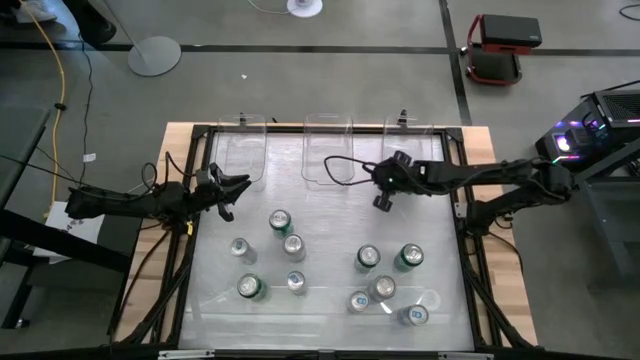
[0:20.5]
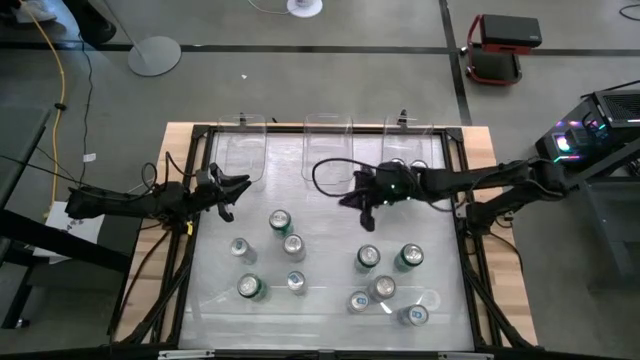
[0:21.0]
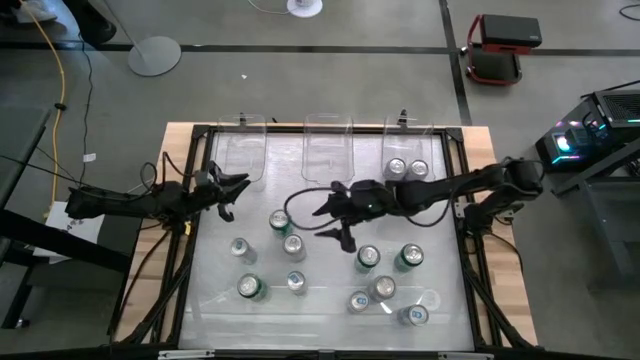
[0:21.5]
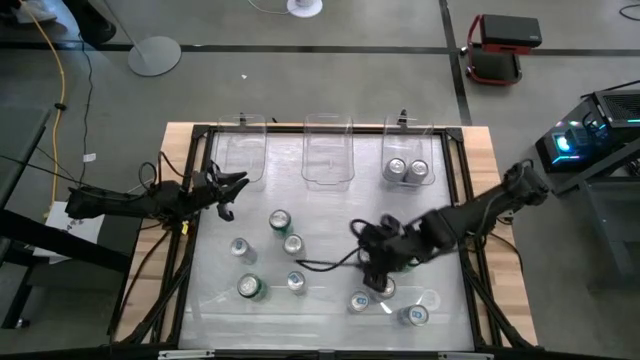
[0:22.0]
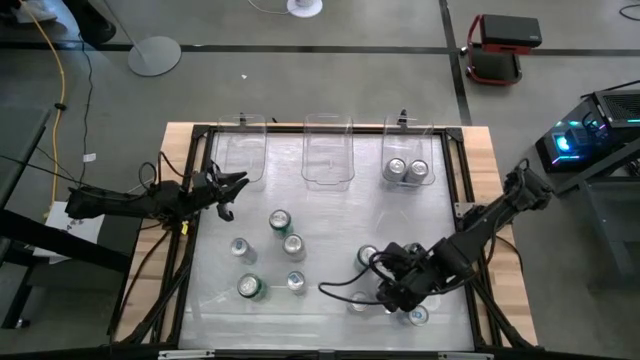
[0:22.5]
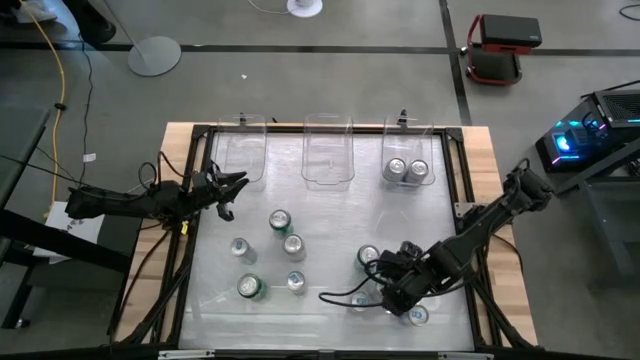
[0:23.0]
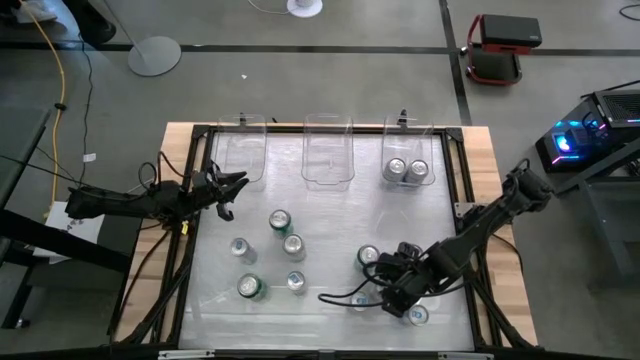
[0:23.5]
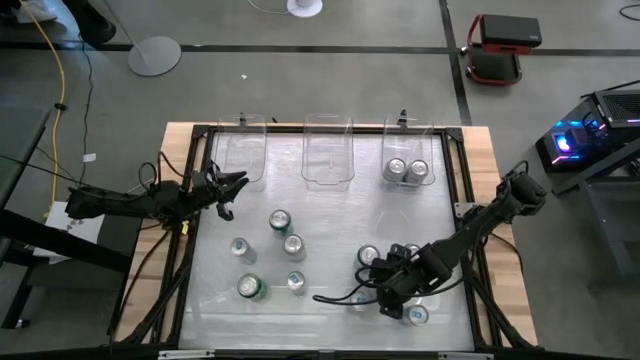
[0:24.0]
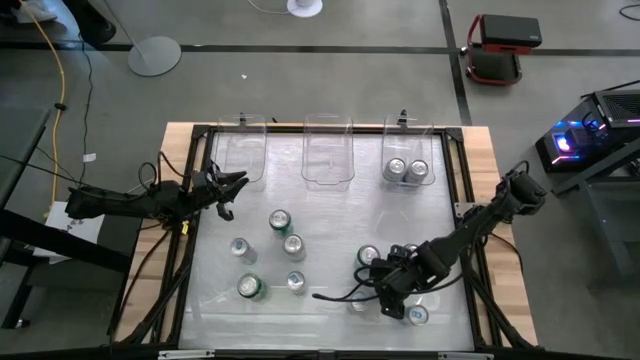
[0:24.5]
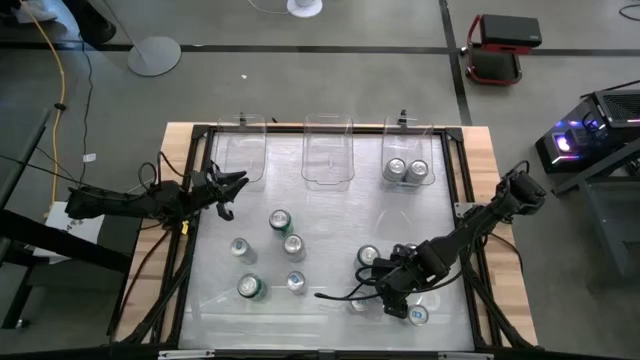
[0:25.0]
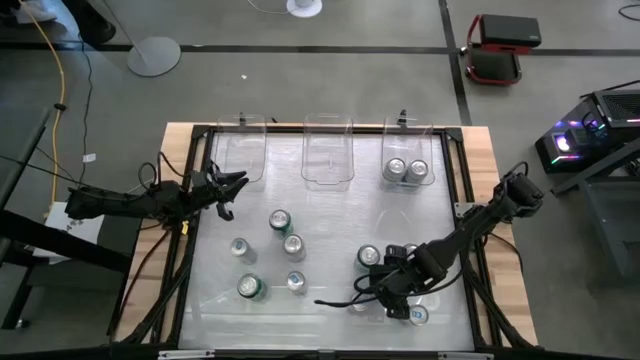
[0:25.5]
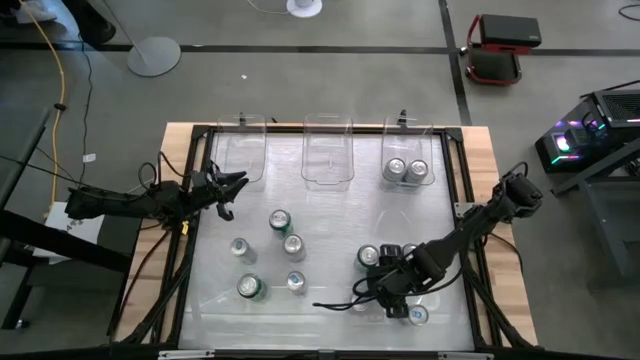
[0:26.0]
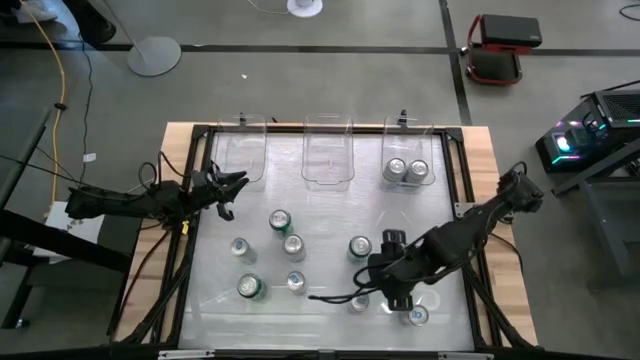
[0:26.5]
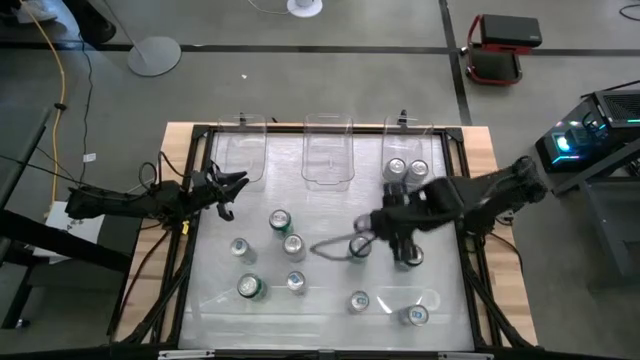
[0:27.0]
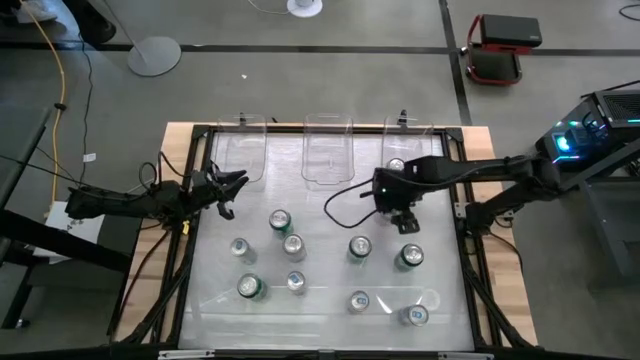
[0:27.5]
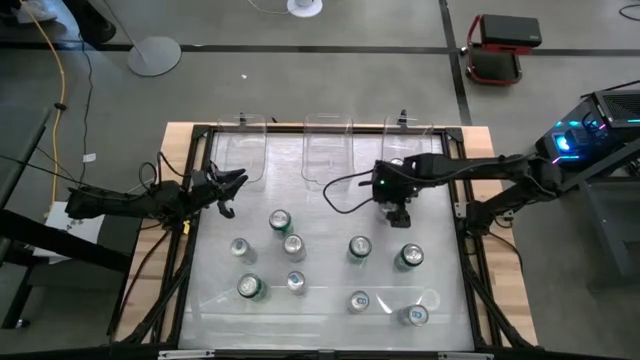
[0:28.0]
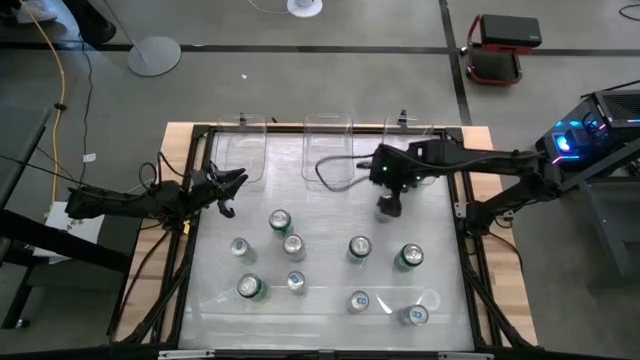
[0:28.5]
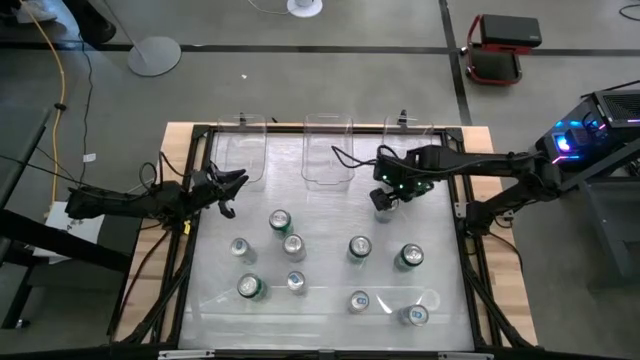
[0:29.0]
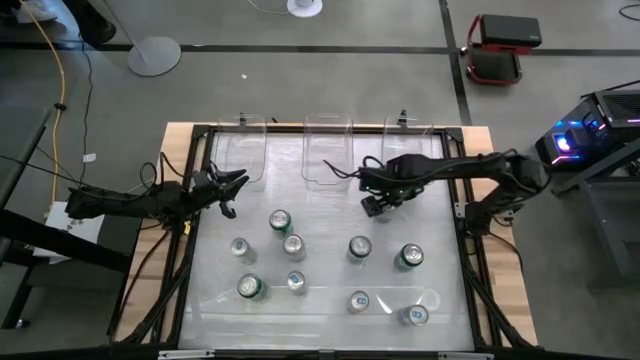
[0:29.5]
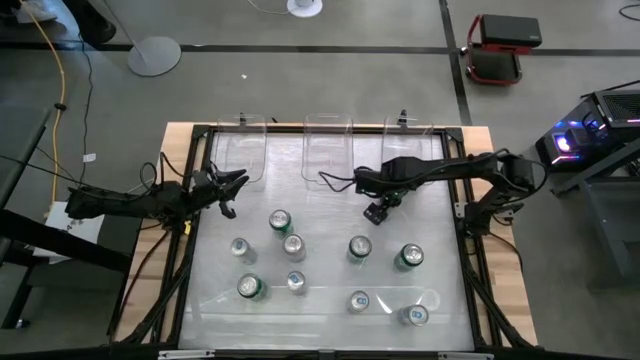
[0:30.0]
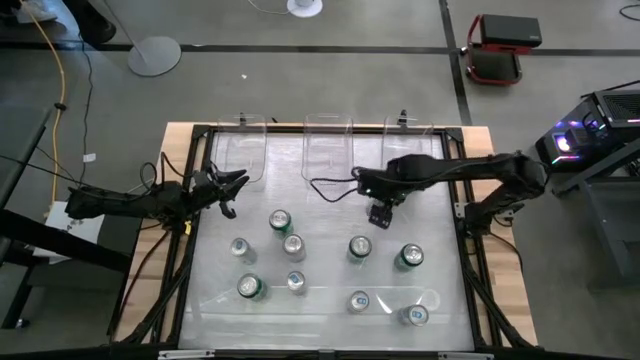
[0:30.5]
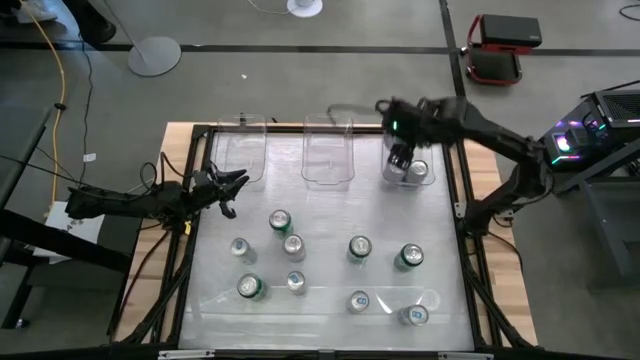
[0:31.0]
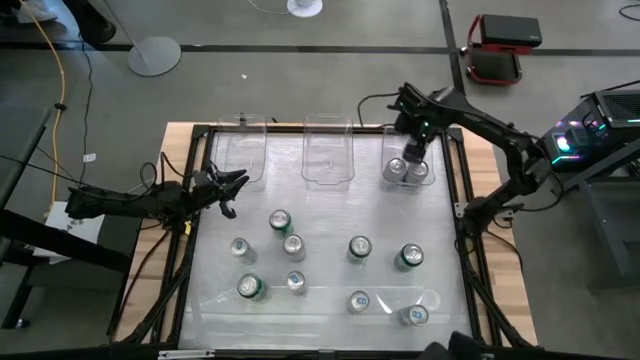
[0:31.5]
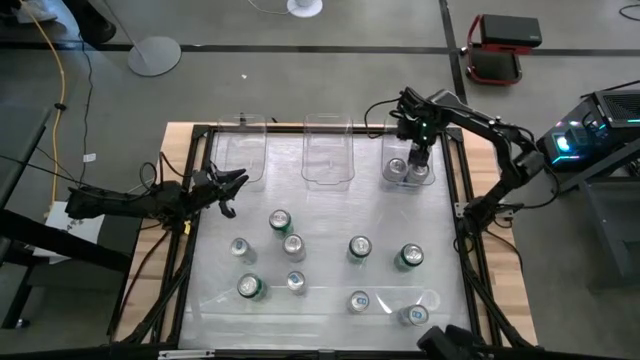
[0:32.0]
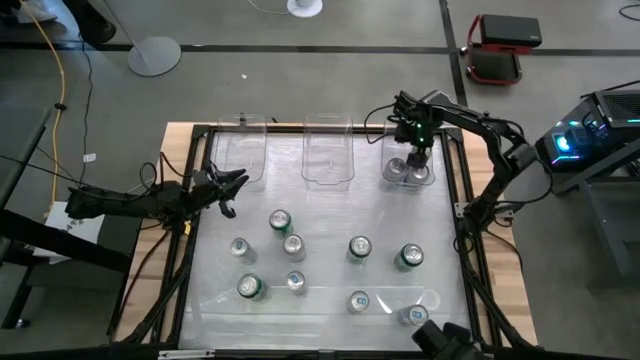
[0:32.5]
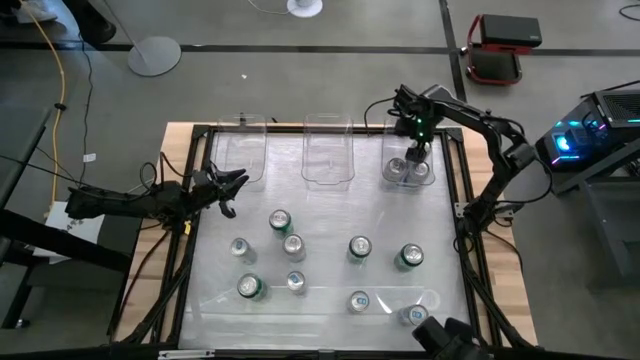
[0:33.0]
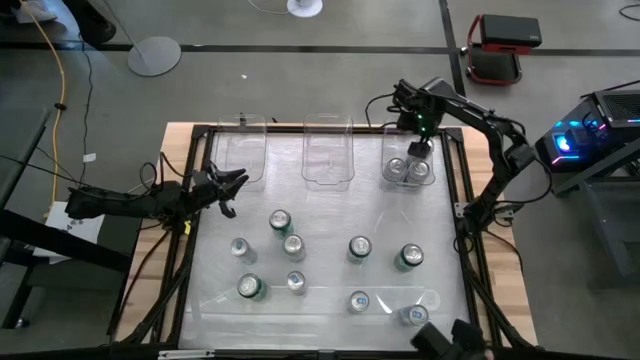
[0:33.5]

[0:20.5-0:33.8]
Task: Sort soda cans
Put the bottom blue-white soda can into the right transparent bin

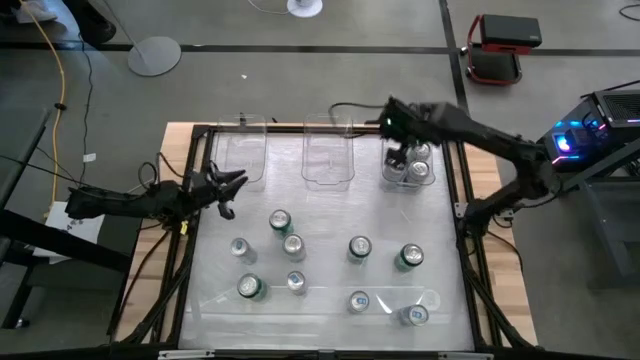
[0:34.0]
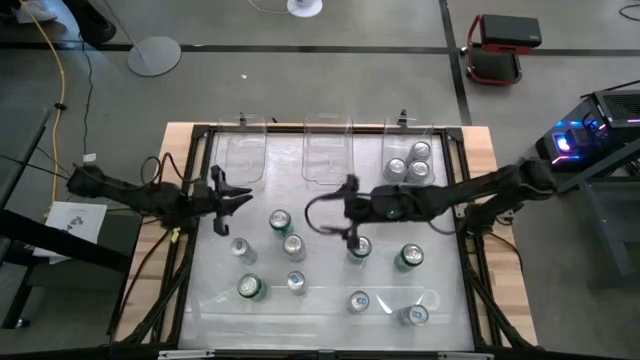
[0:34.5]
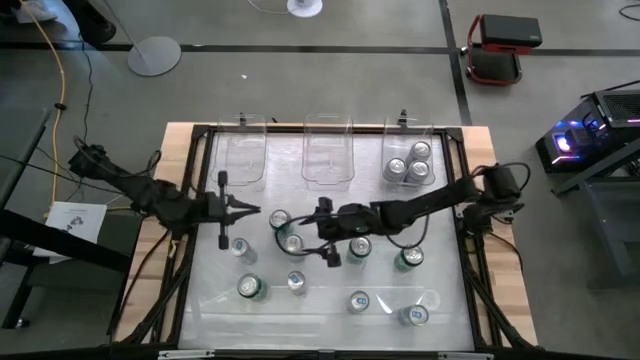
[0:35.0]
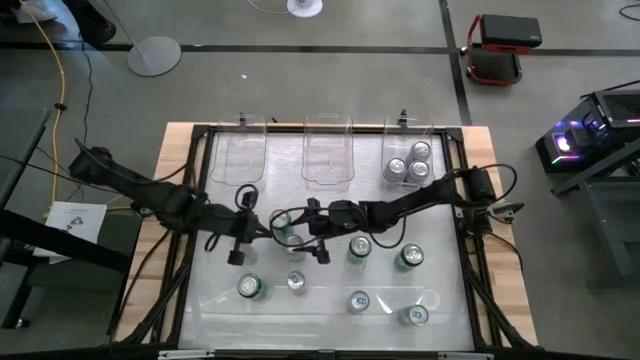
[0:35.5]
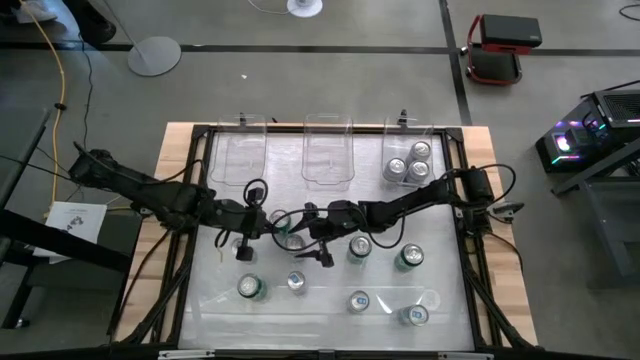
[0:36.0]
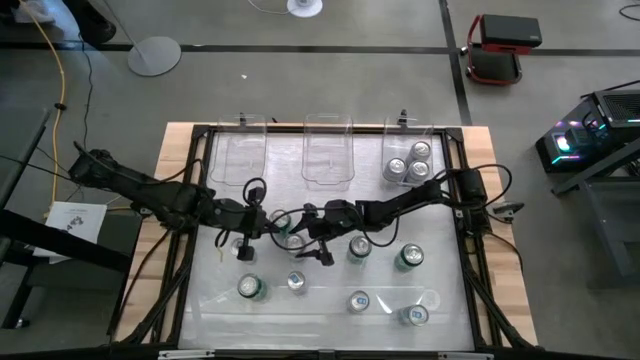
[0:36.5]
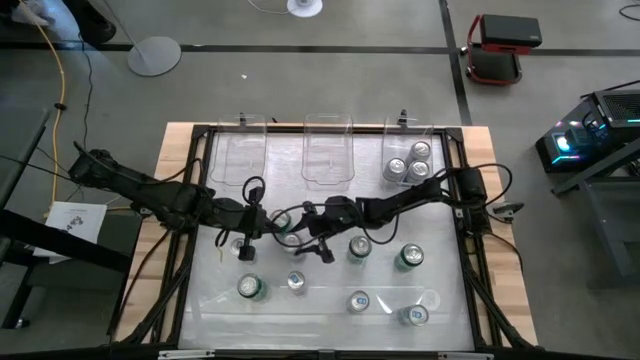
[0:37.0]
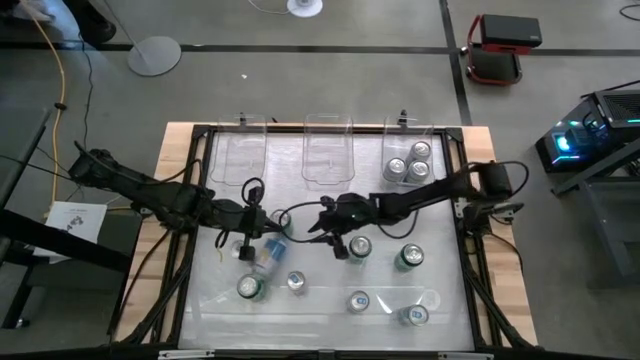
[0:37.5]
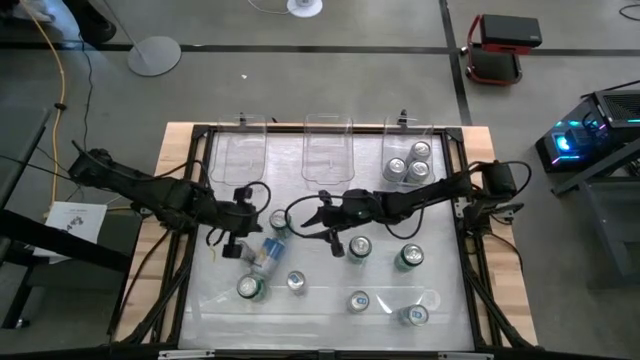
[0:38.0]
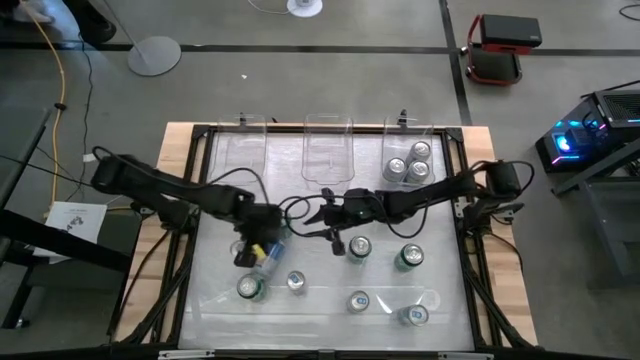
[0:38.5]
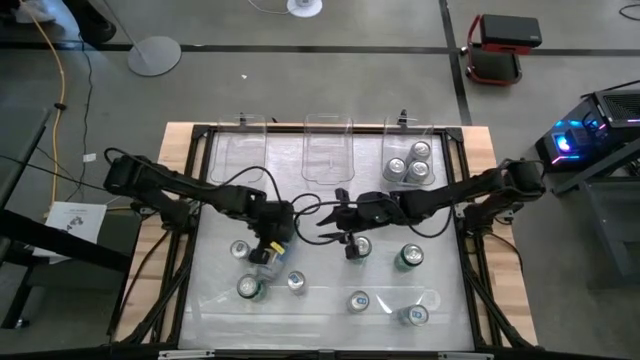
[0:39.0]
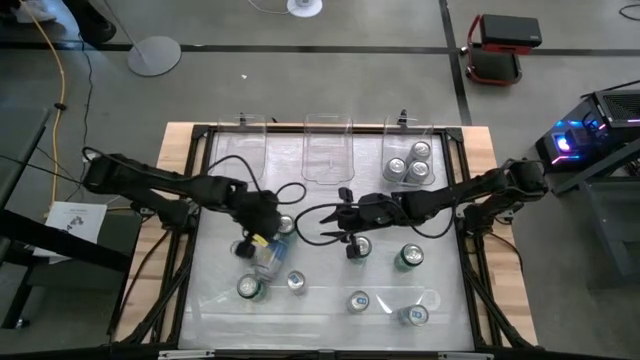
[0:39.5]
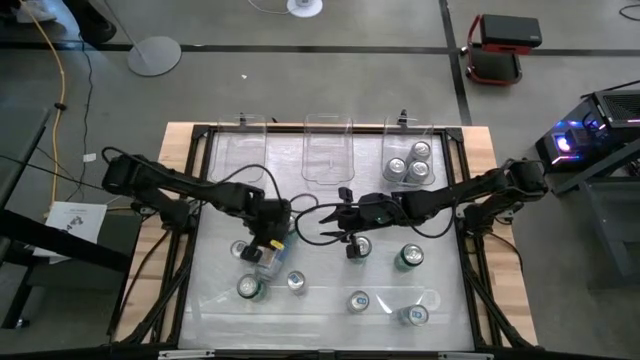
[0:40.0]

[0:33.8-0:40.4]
Put the blue-white soda can into the right transparent bin

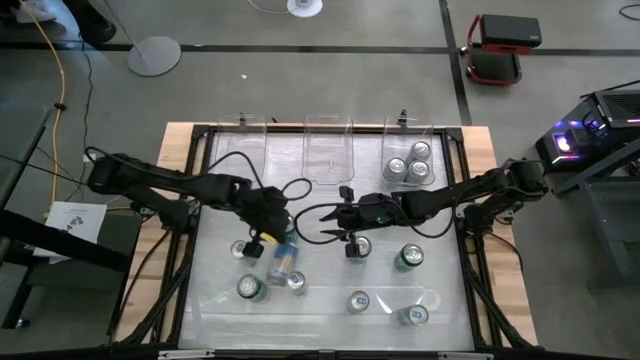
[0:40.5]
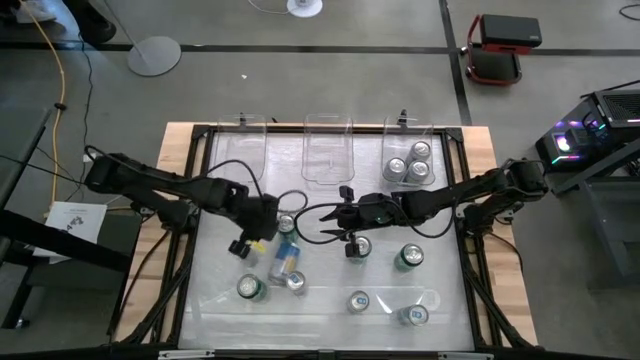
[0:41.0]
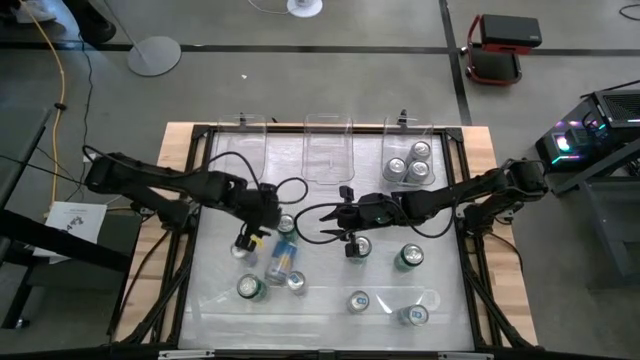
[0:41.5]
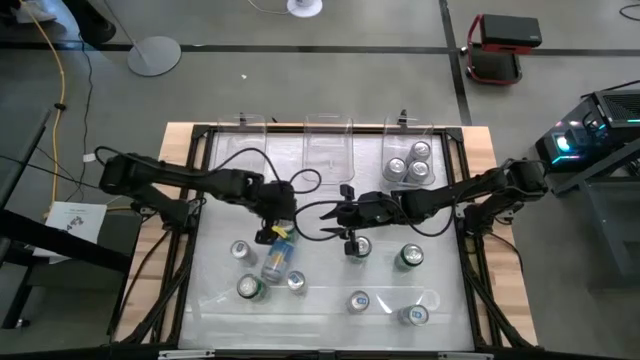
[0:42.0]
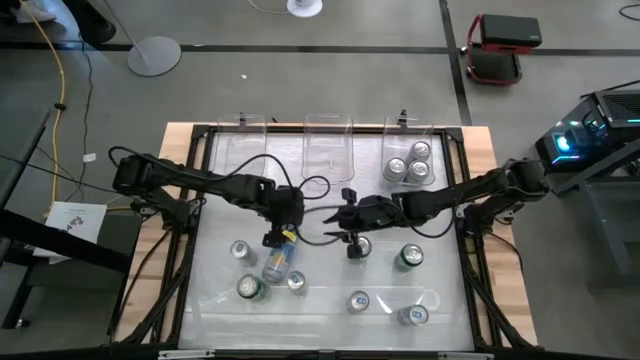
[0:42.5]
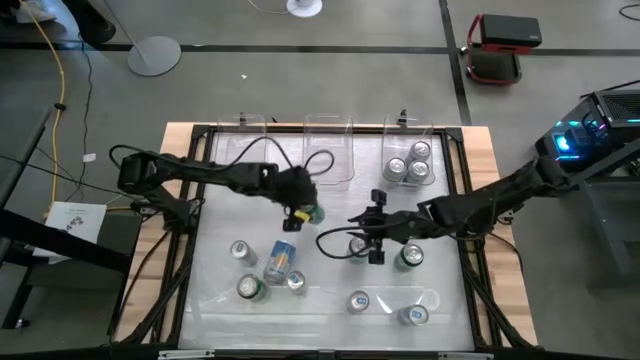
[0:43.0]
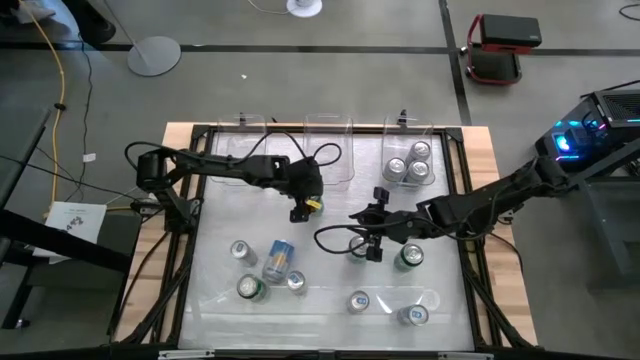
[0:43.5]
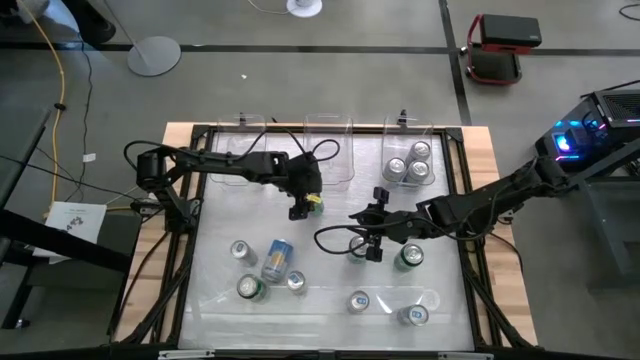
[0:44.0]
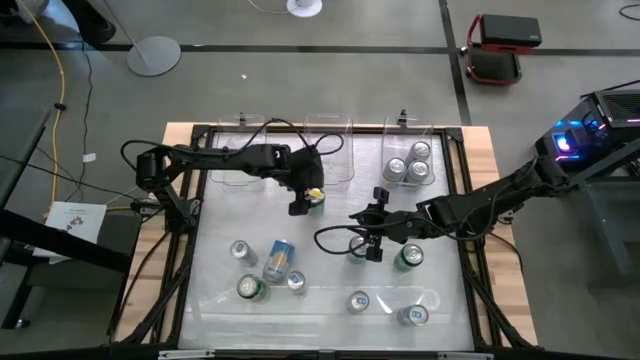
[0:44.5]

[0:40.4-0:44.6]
Move the top right green soda can to the middle of the table
